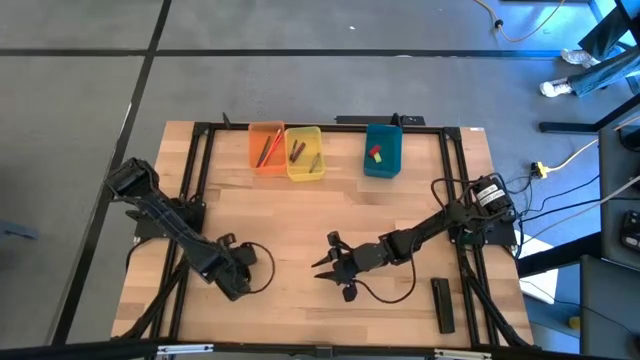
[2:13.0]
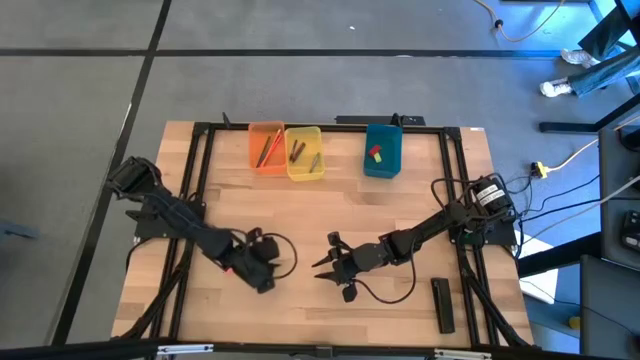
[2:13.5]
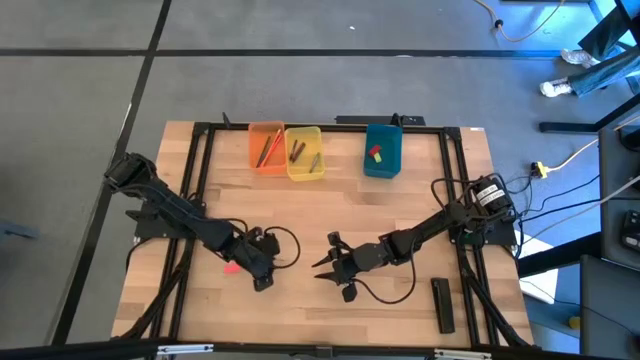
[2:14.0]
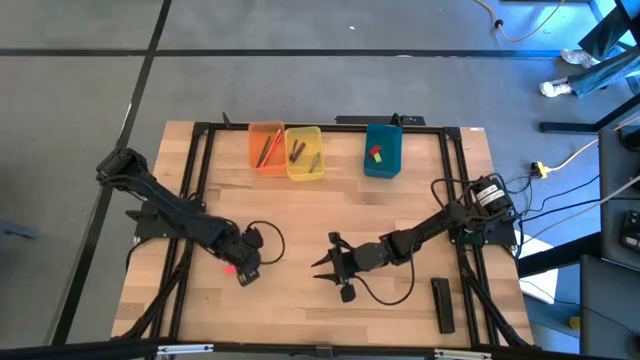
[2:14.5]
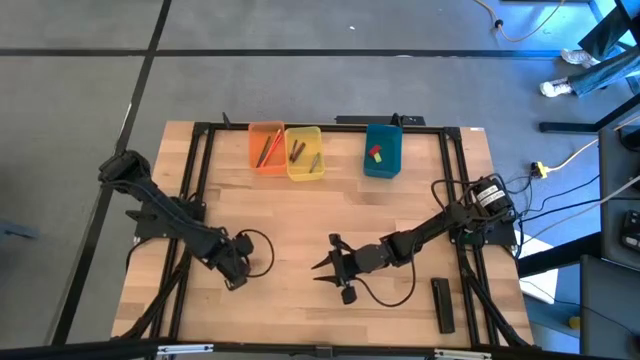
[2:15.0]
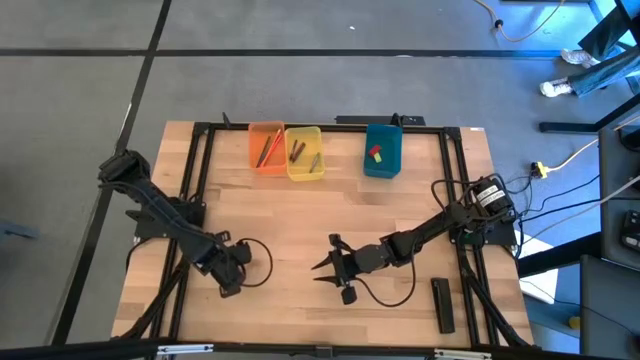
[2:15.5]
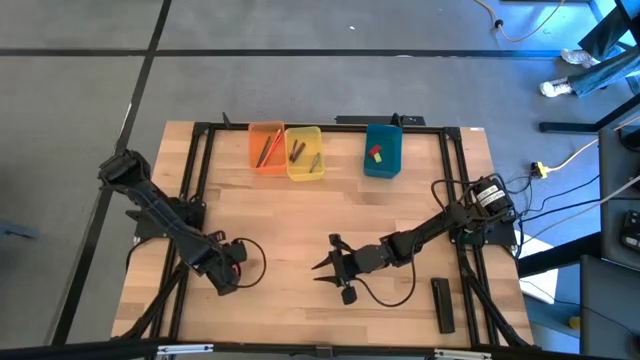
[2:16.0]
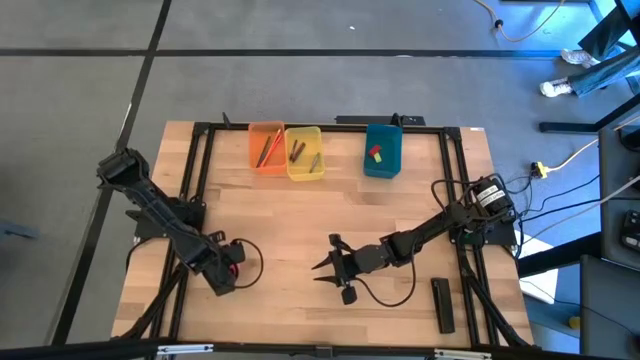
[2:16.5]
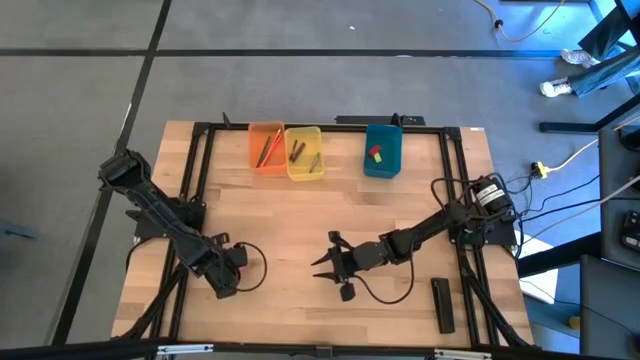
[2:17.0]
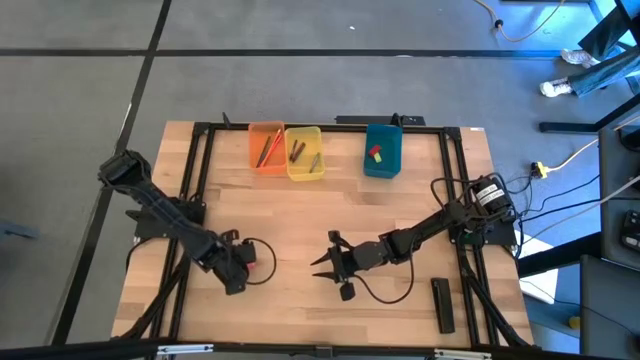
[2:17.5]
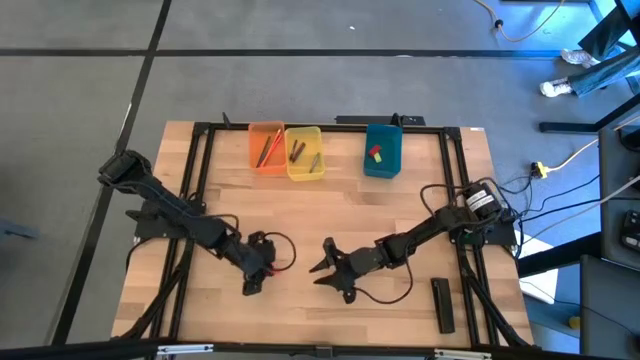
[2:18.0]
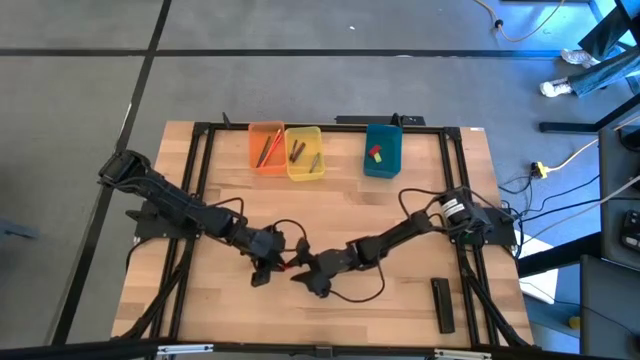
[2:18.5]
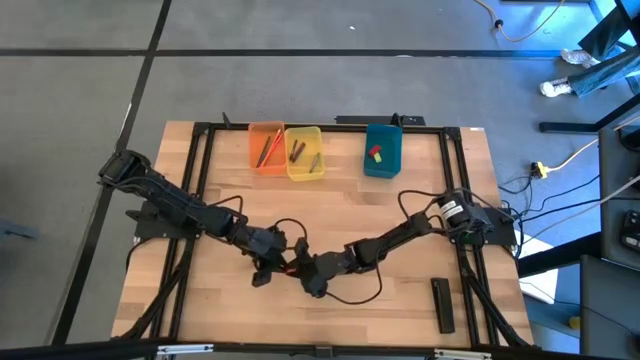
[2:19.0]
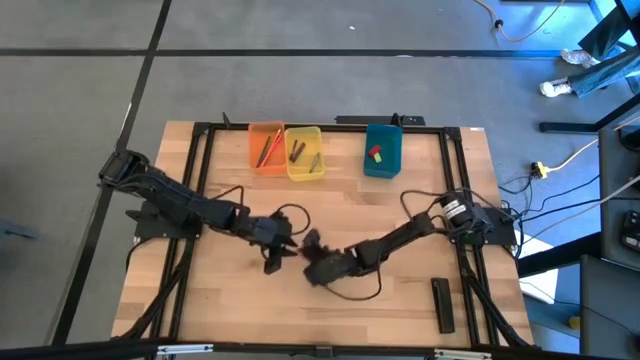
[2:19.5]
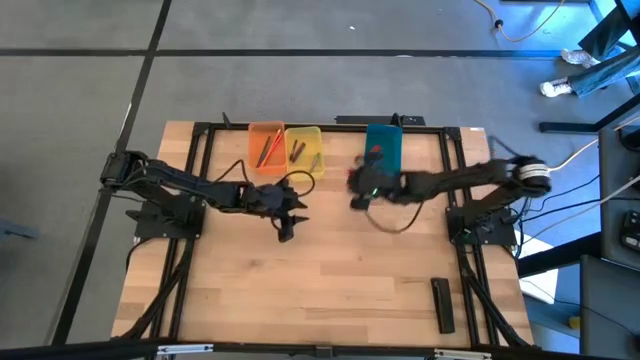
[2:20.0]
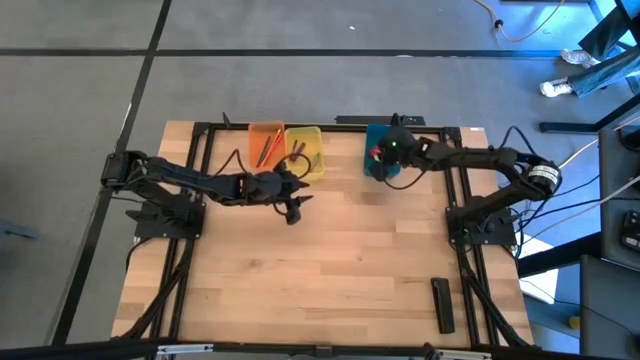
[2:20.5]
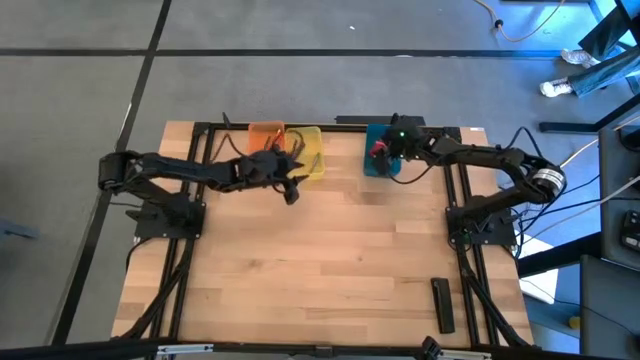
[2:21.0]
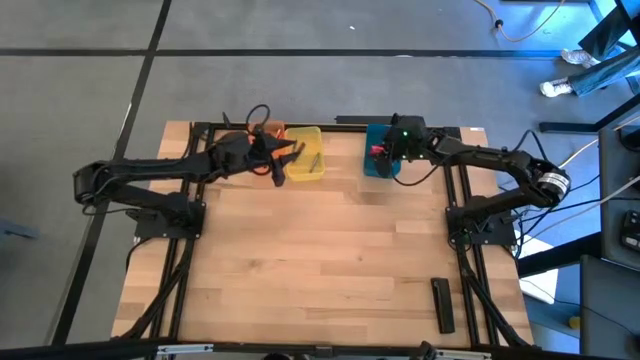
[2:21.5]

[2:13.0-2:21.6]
Task: Sort crayons/erasers/pens/pencils in bins
Put the pink eraser into the blue bin

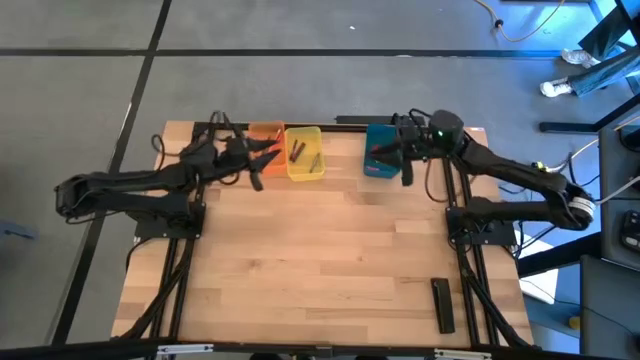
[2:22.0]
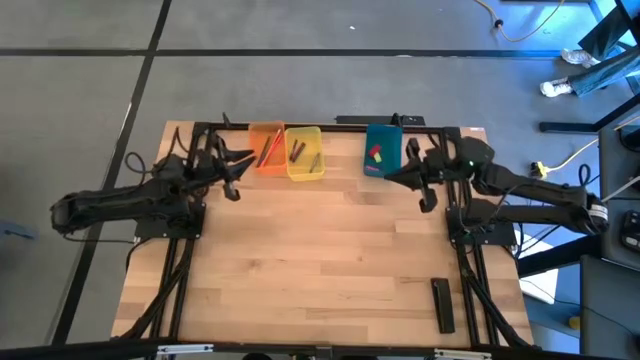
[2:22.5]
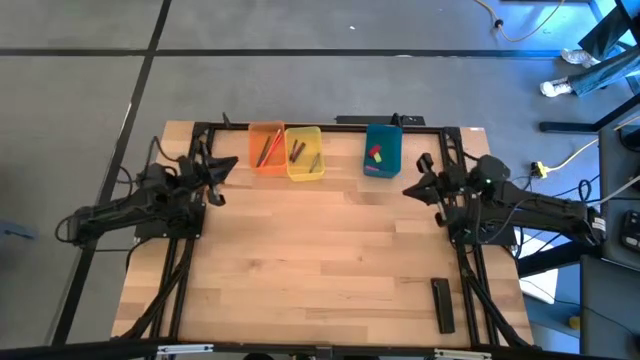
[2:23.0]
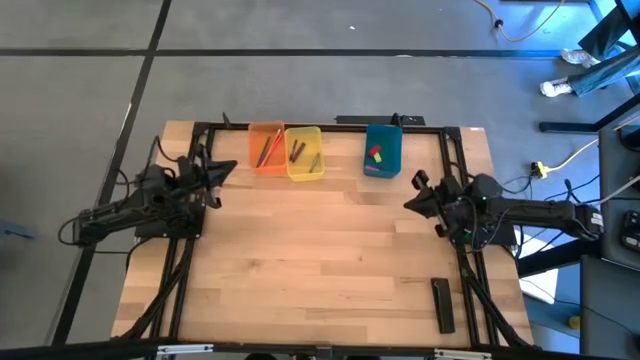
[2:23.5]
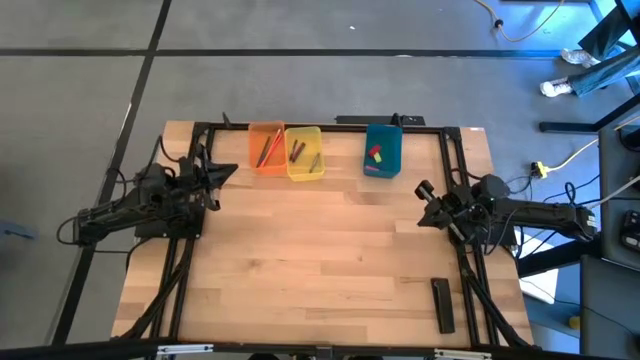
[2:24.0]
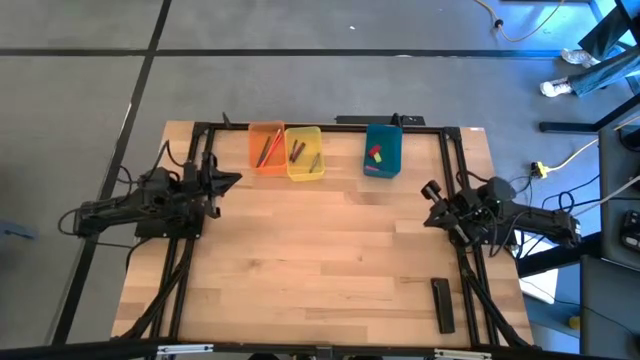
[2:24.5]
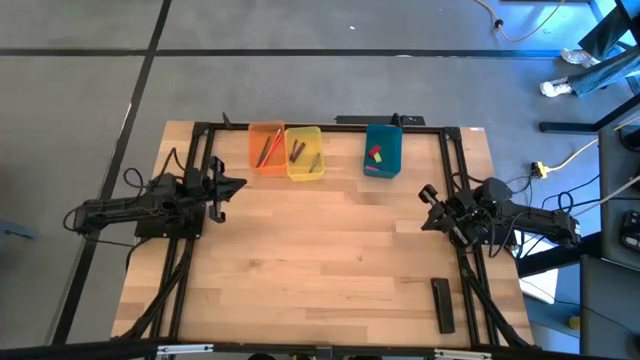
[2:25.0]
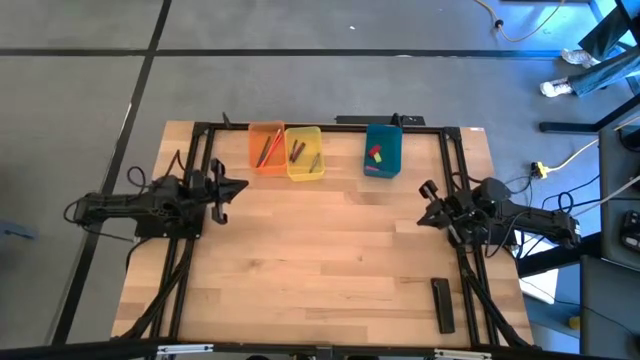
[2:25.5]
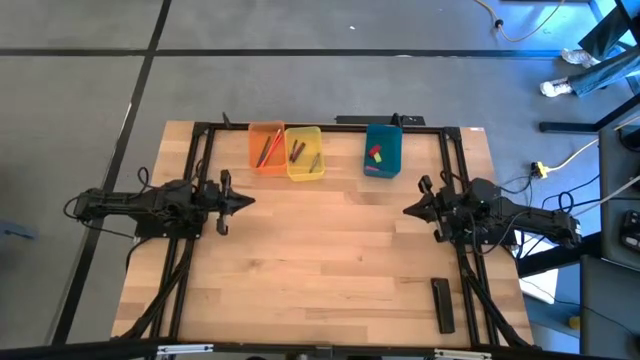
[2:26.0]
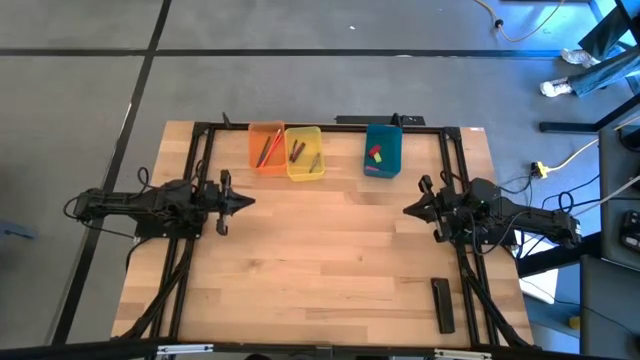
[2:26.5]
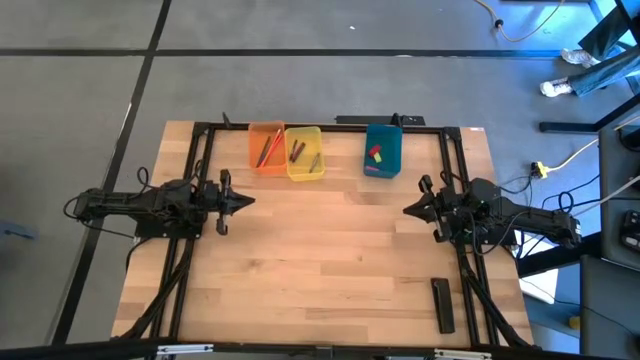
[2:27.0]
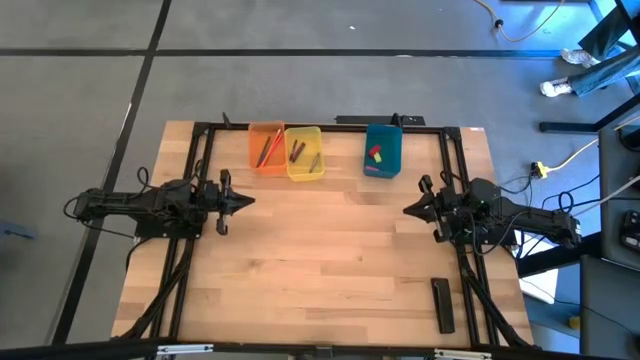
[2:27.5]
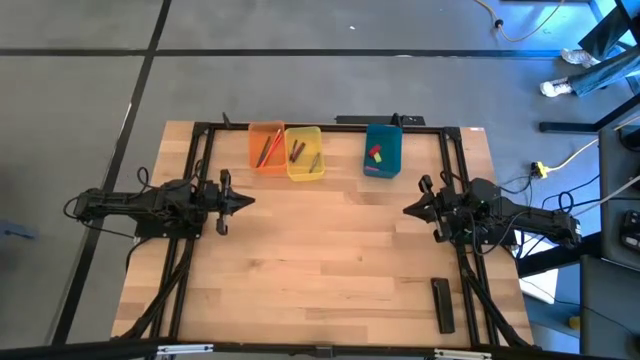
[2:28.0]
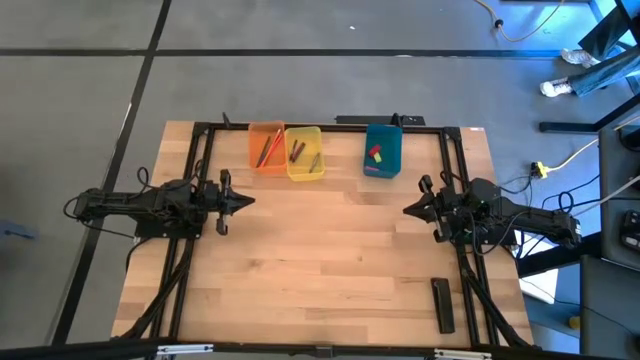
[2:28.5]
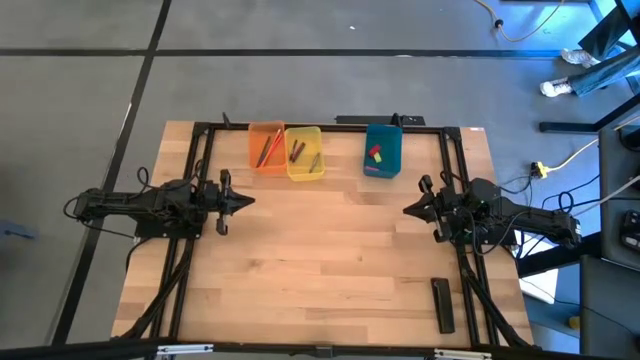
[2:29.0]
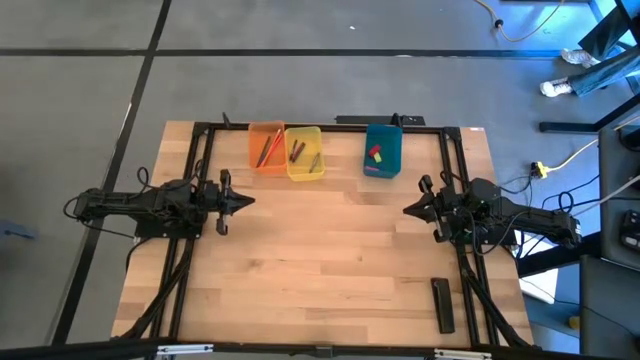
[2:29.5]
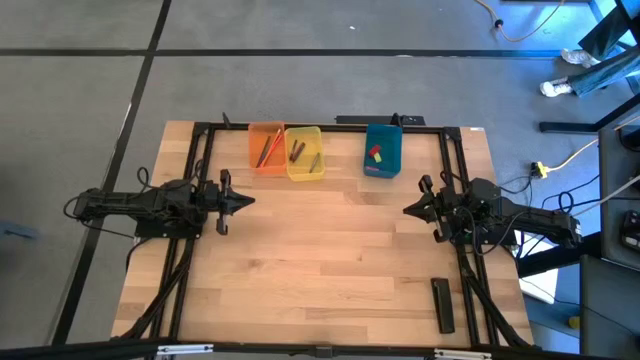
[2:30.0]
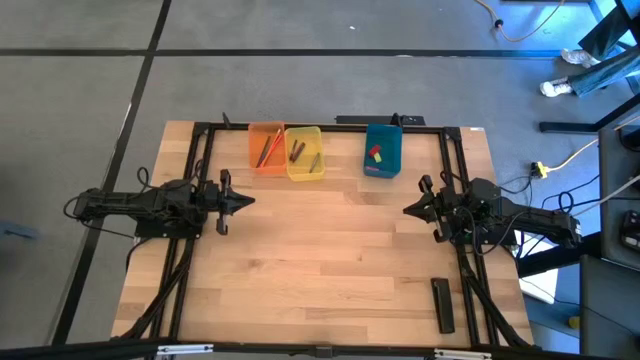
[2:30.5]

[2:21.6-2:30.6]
Return to Home Position

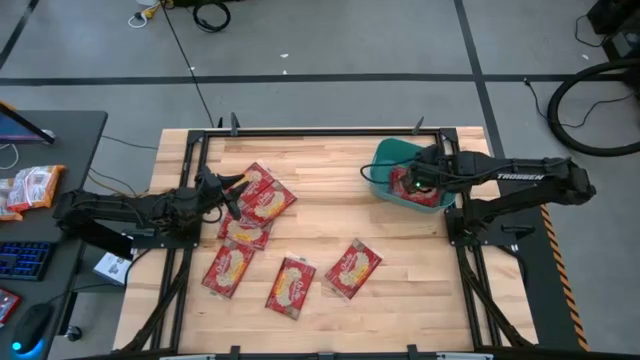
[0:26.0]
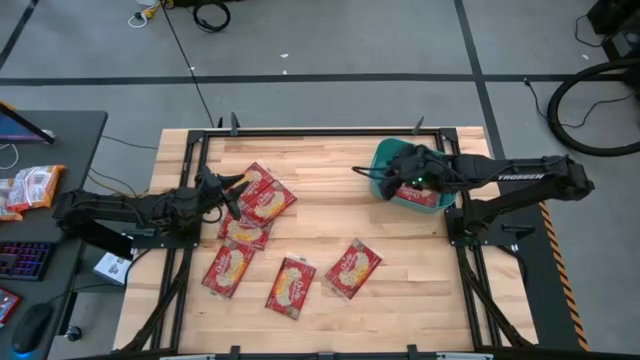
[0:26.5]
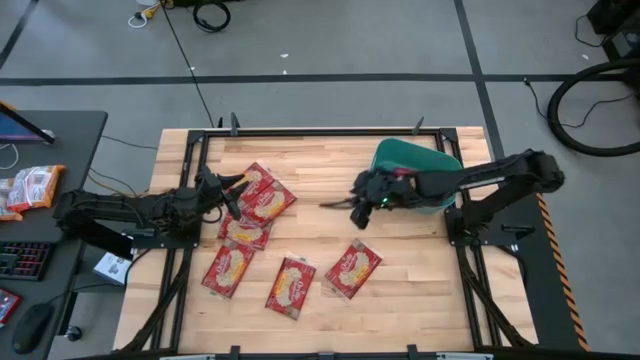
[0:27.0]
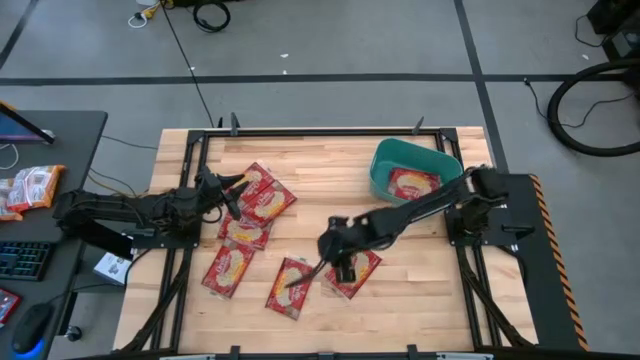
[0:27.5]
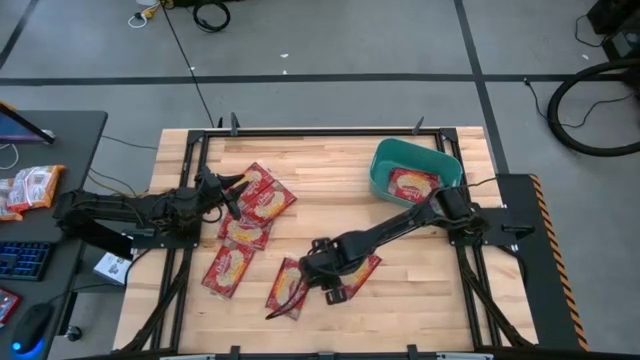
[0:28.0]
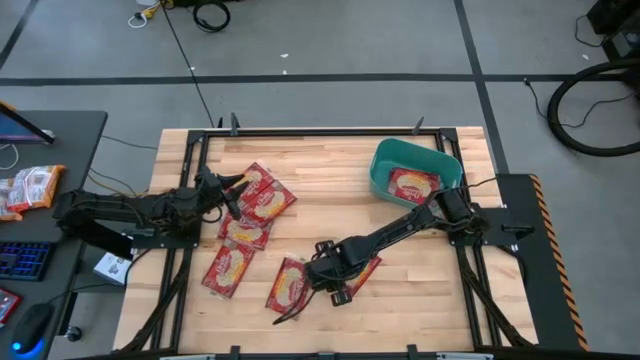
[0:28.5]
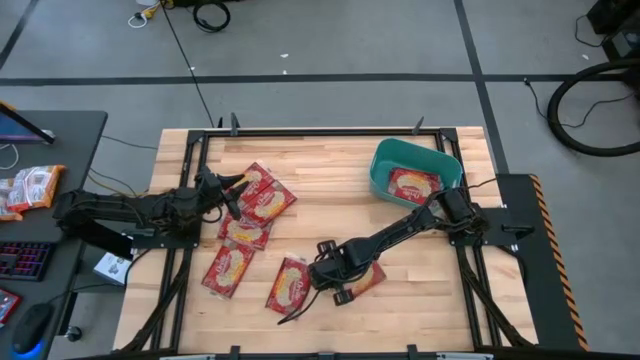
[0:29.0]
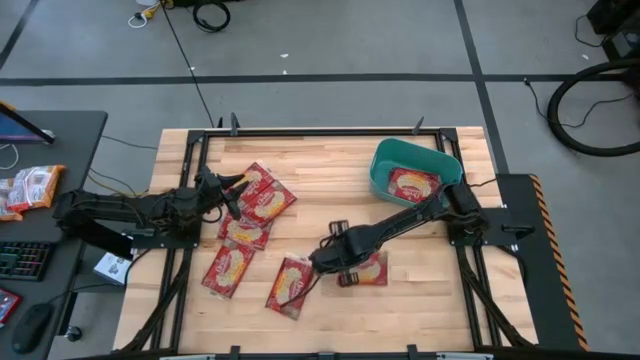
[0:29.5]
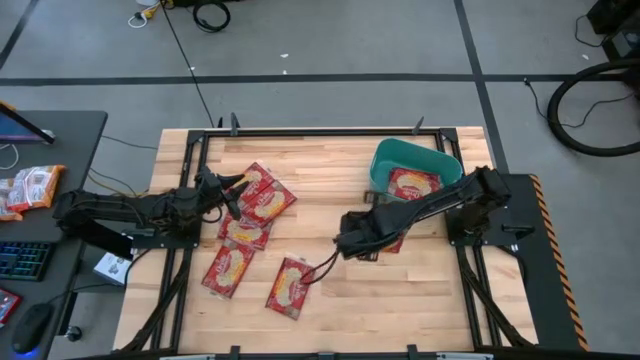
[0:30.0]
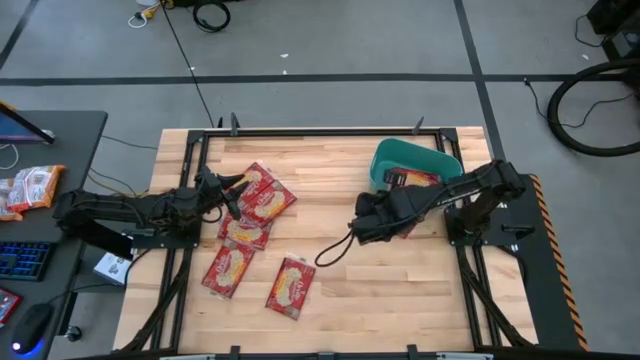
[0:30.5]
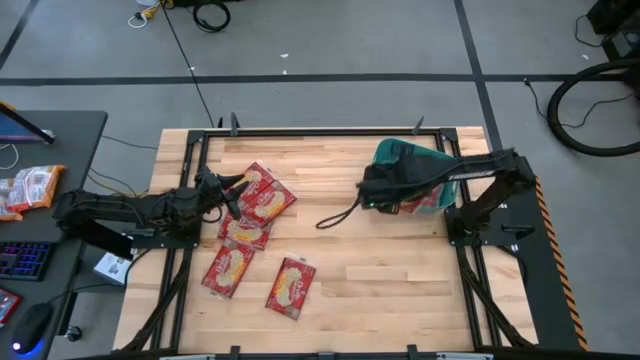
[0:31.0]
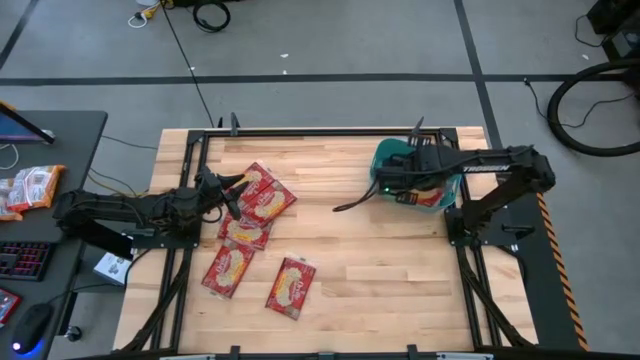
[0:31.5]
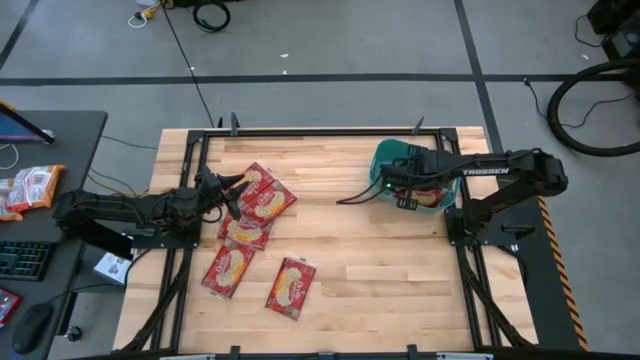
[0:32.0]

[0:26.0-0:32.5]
Task: Sort popcorn bags into baskets
Put the red popcorn bag into the green container
